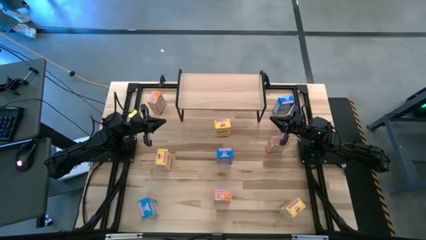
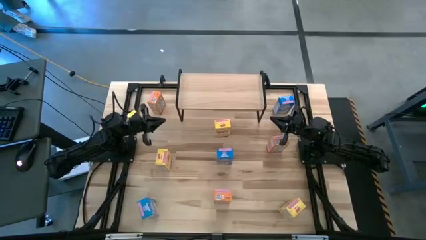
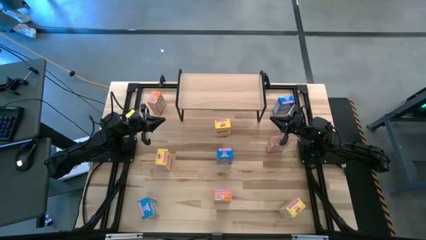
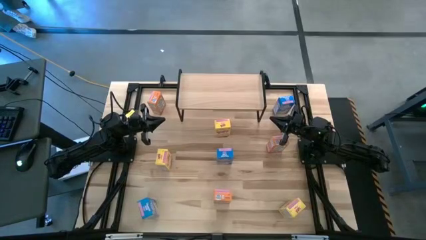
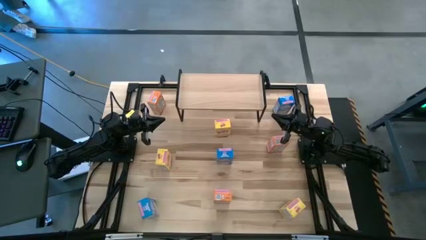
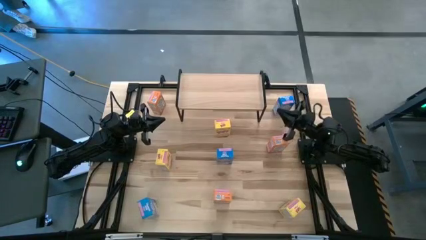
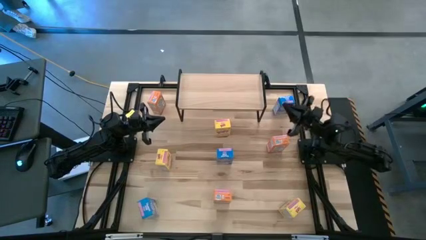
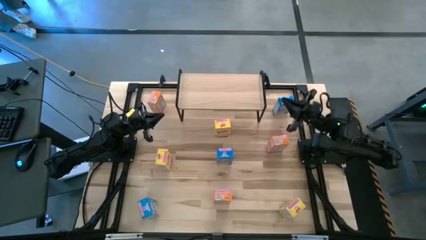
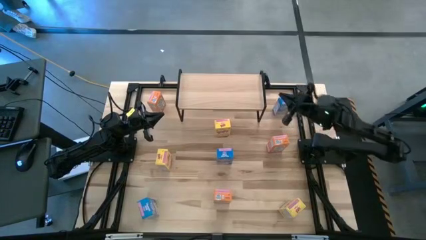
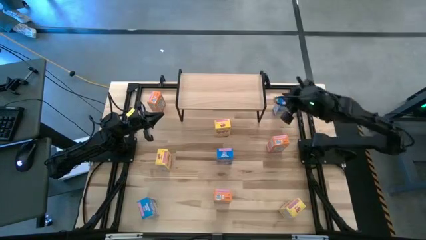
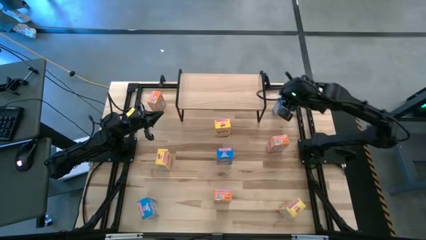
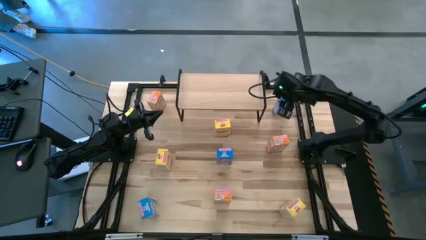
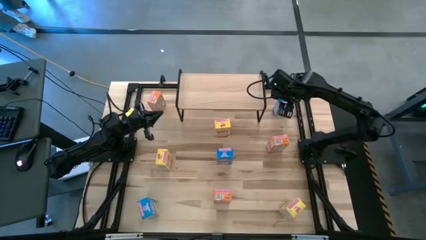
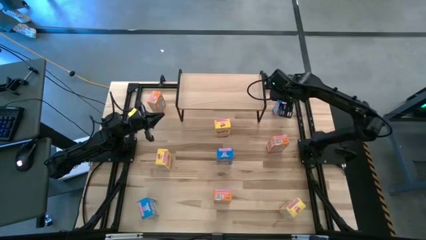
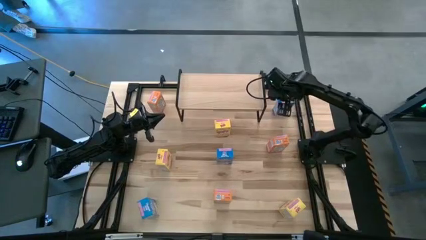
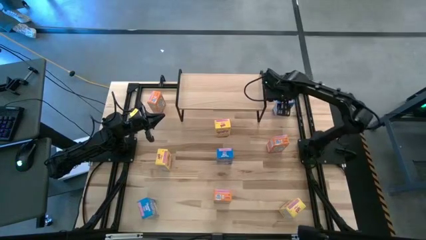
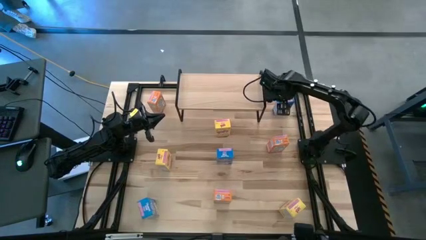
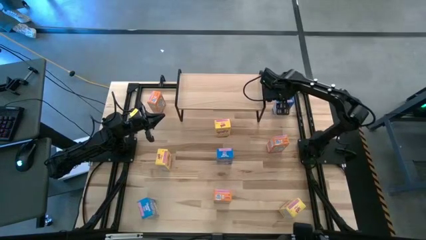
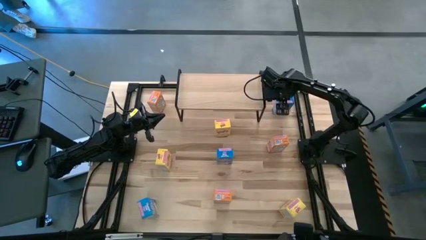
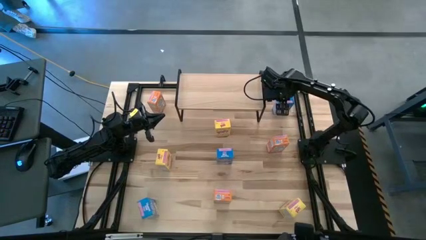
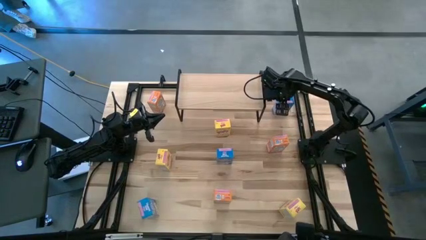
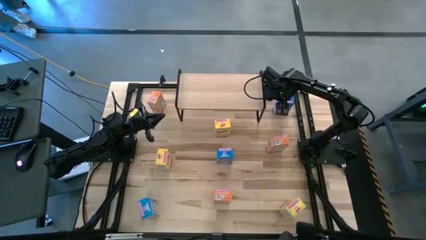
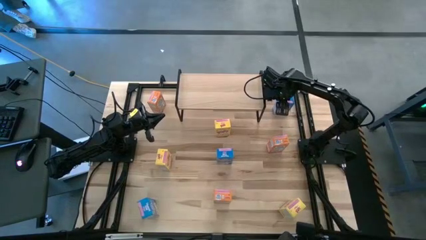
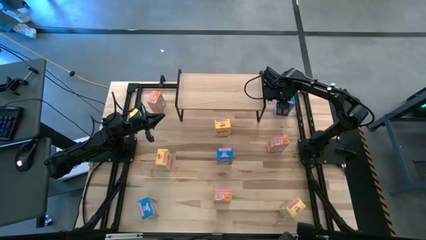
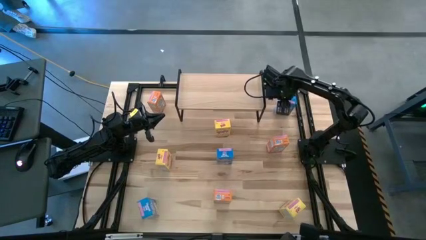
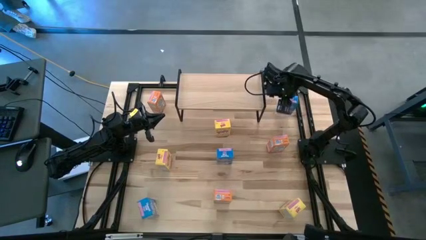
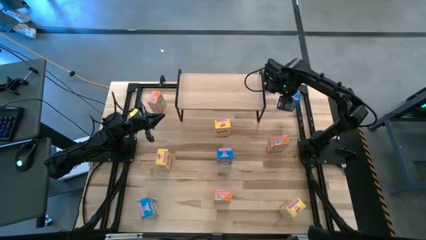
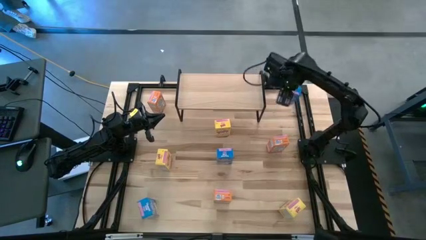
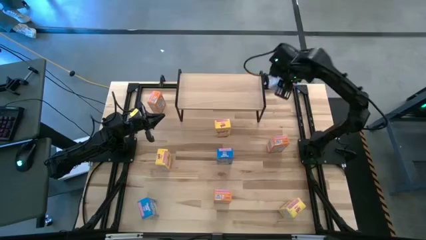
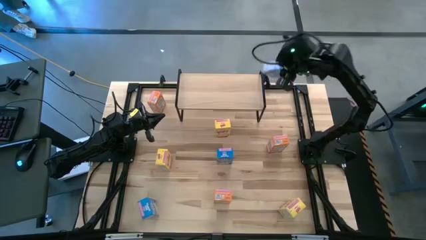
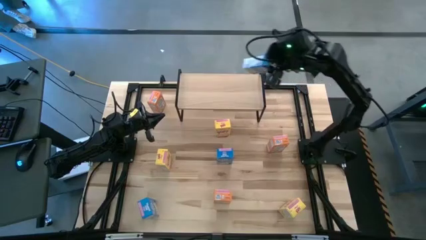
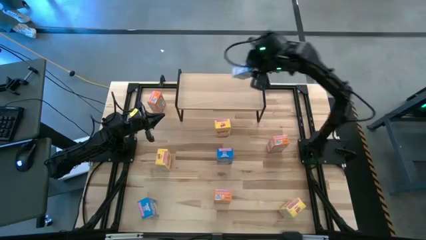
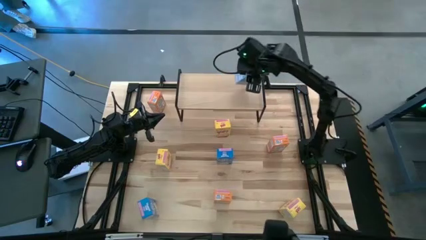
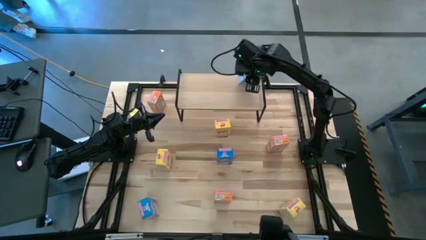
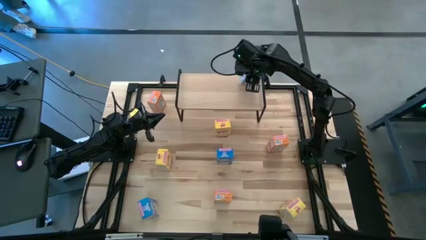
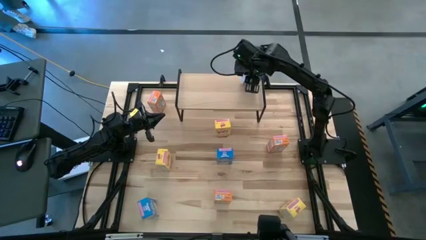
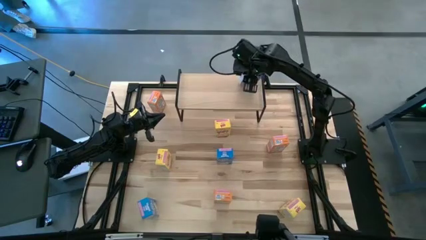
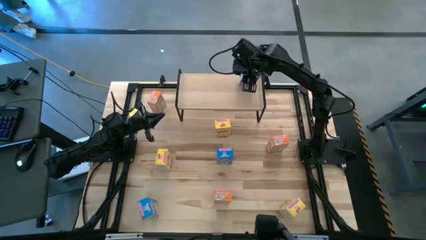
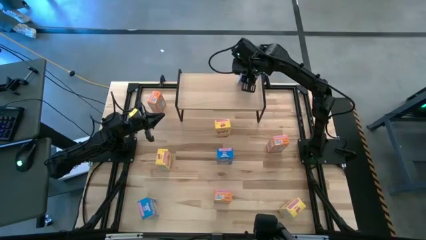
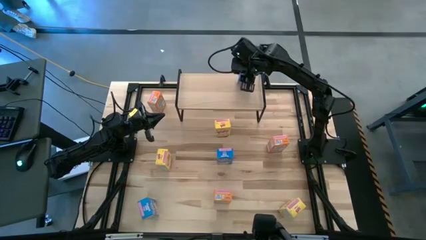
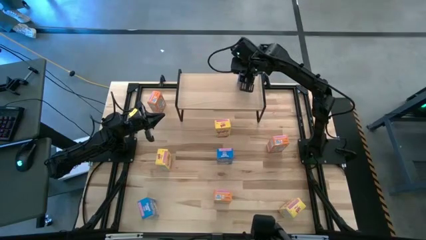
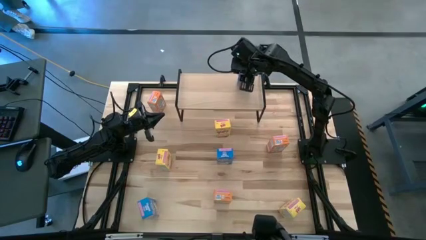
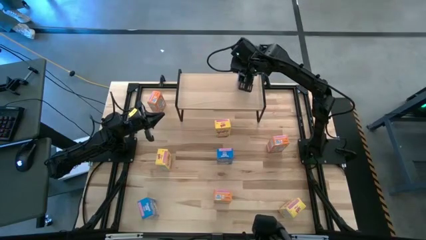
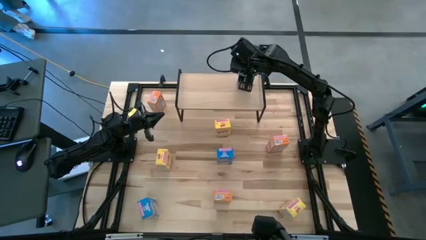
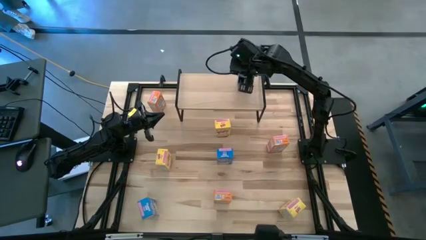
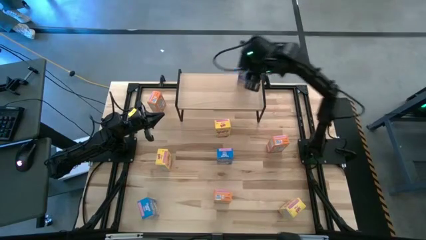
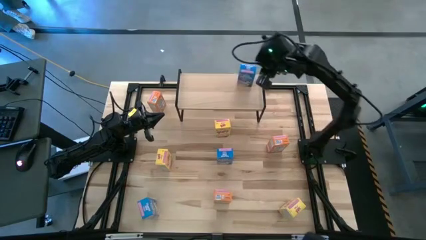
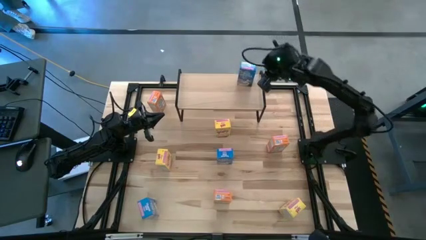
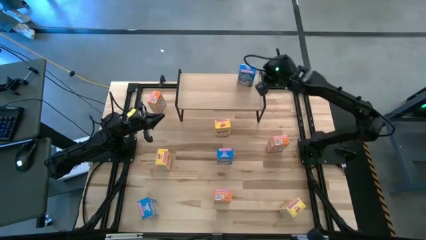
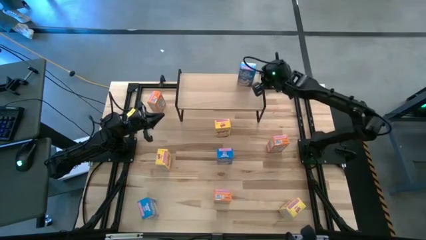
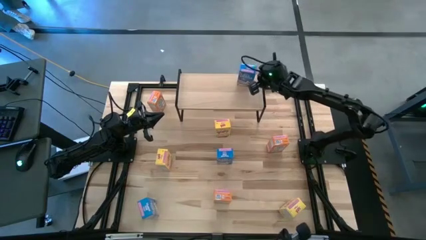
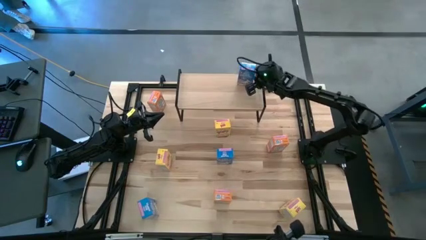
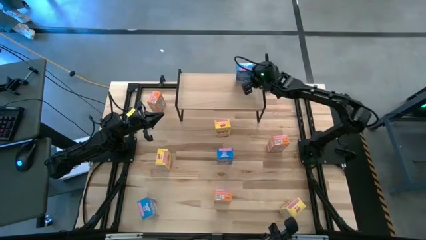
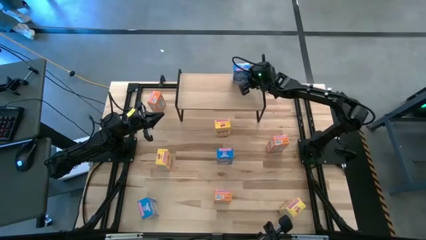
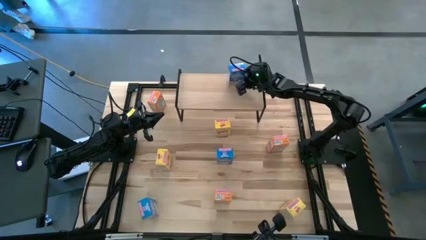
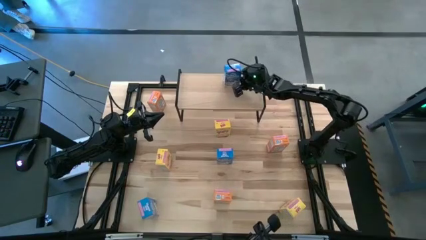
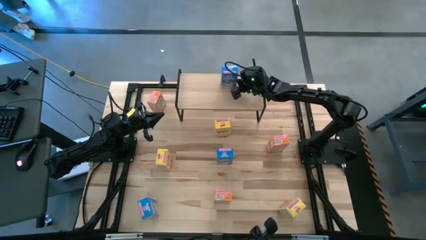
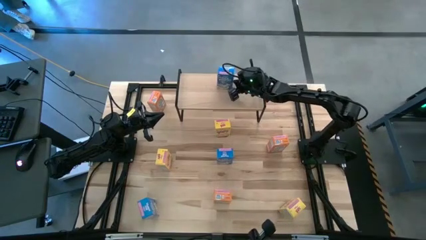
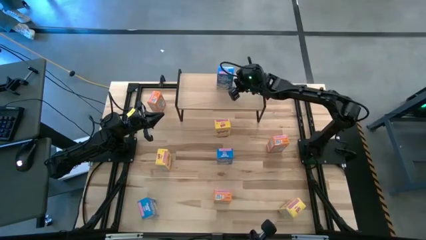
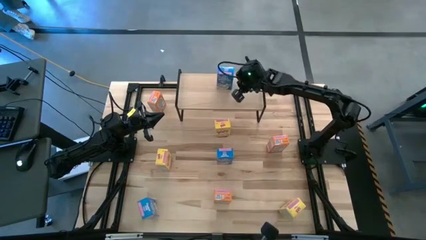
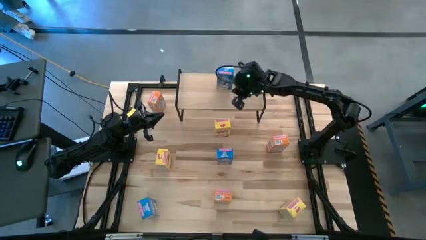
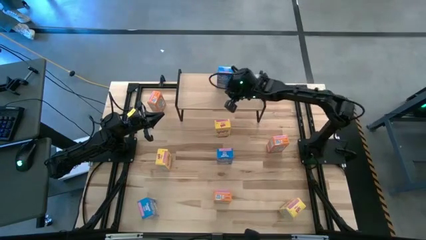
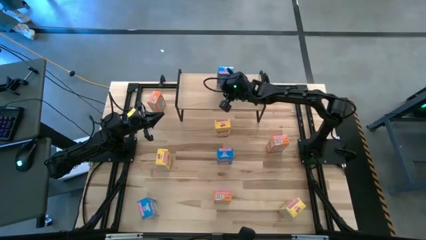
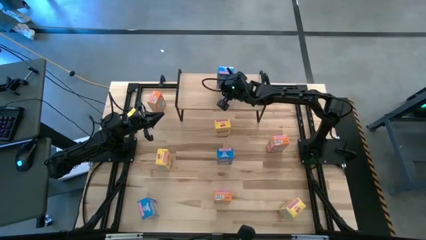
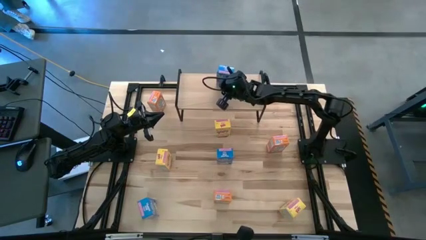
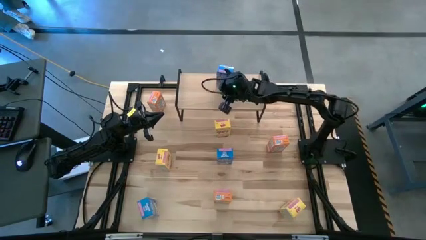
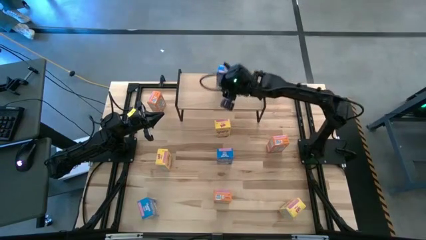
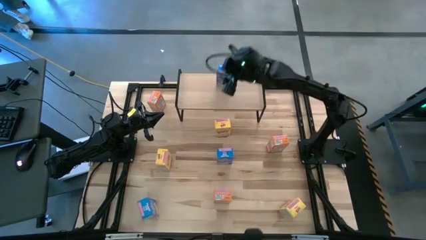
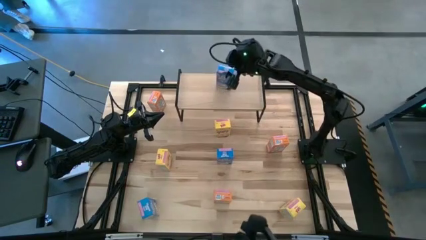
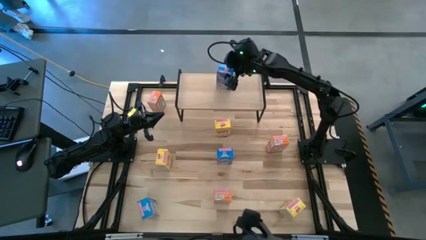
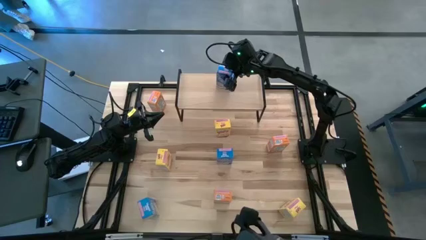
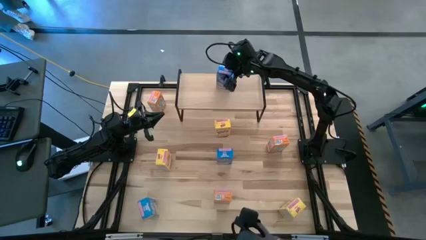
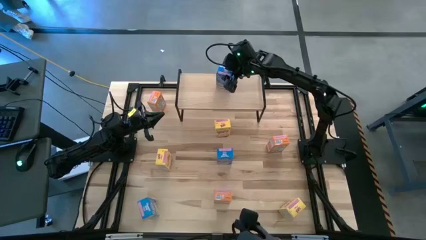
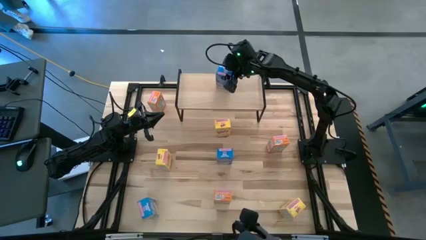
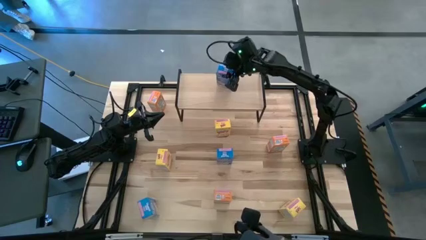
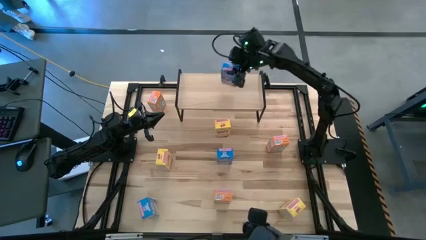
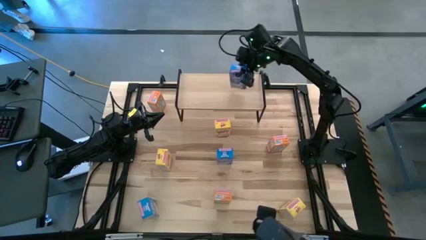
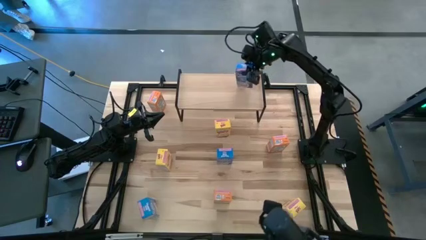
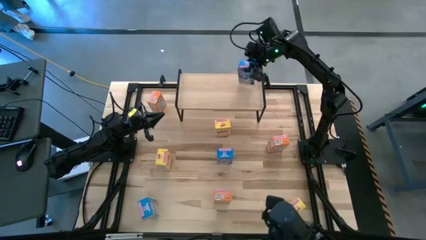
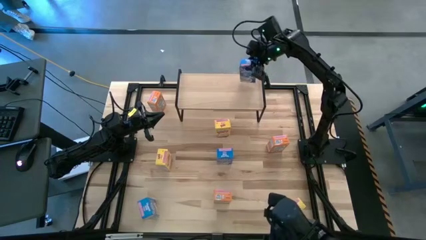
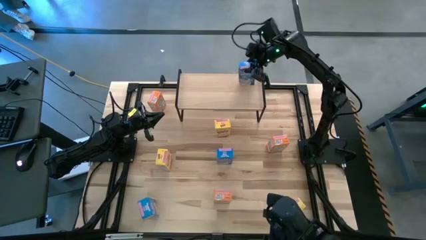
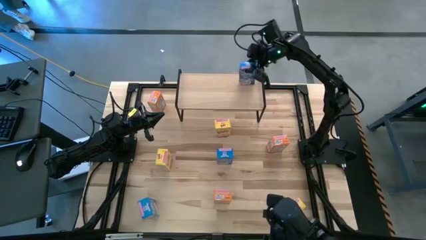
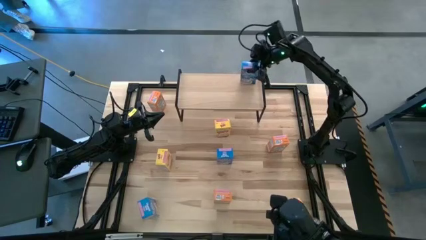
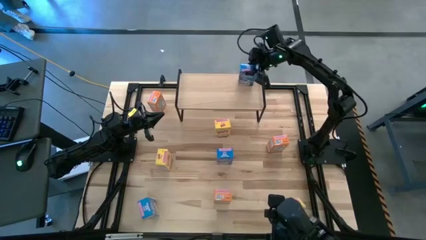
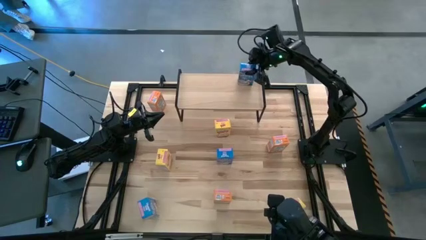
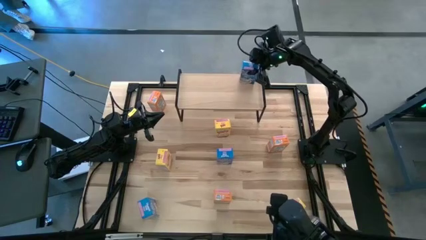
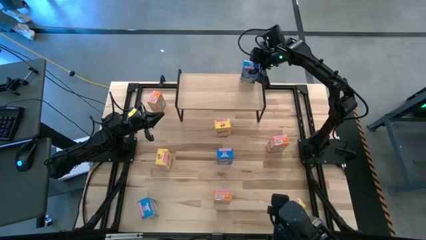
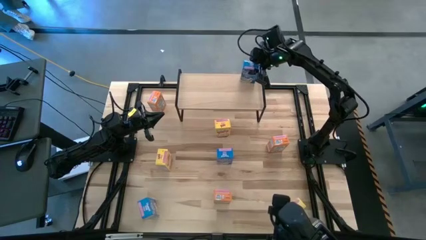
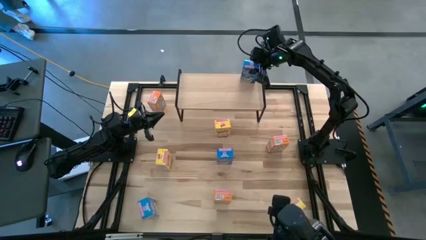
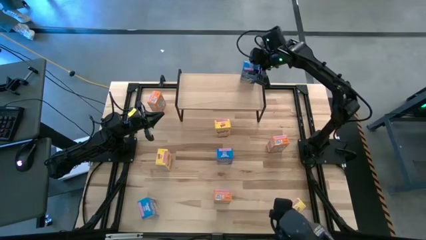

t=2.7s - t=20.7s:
Task: Stack cereal on shelf
Put the top right blue cereal box on the shelf
